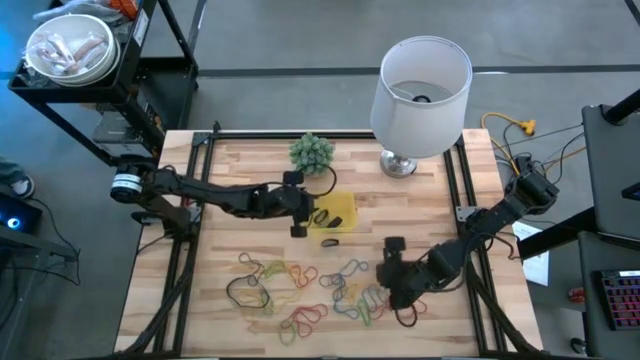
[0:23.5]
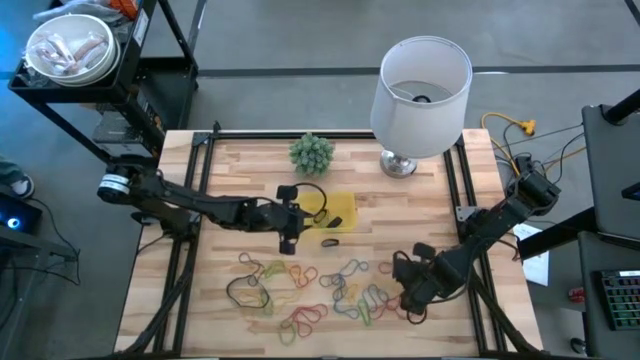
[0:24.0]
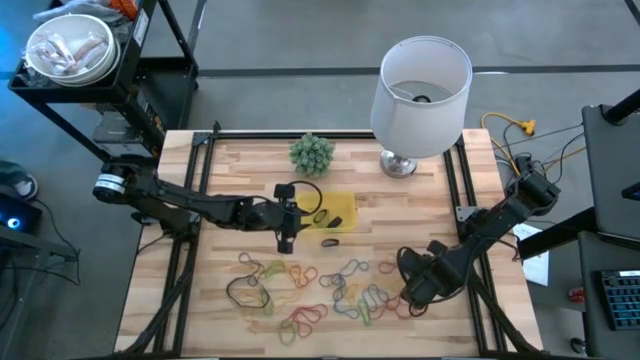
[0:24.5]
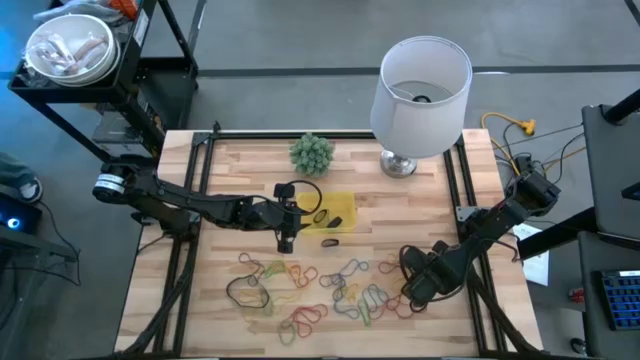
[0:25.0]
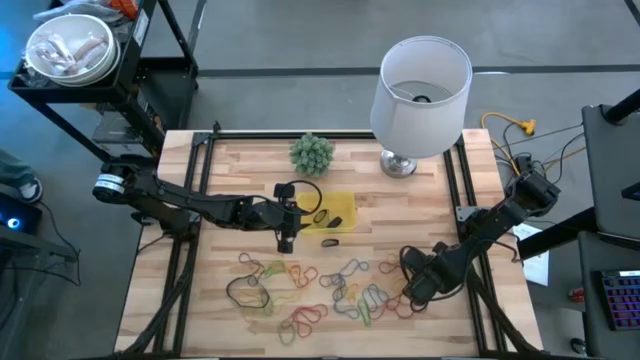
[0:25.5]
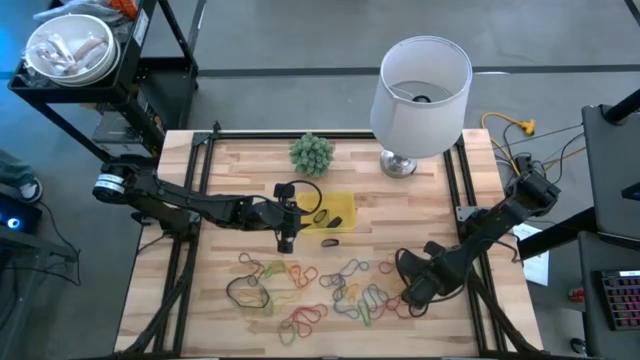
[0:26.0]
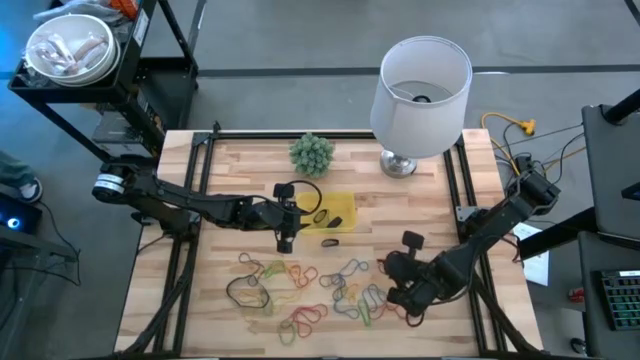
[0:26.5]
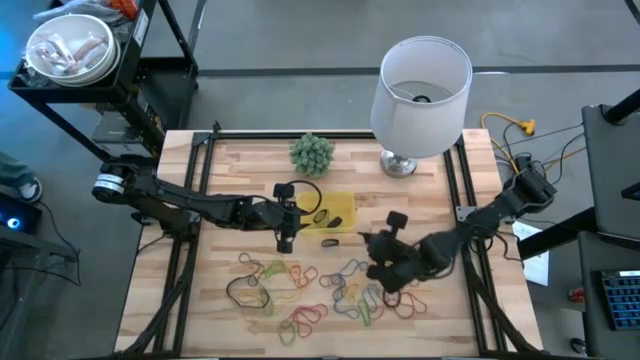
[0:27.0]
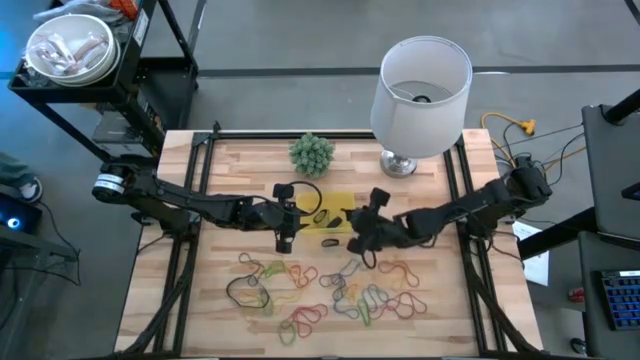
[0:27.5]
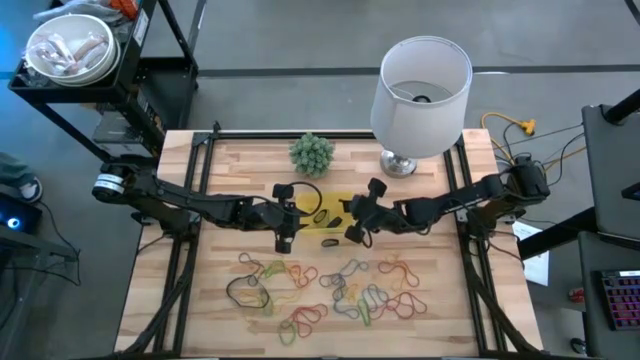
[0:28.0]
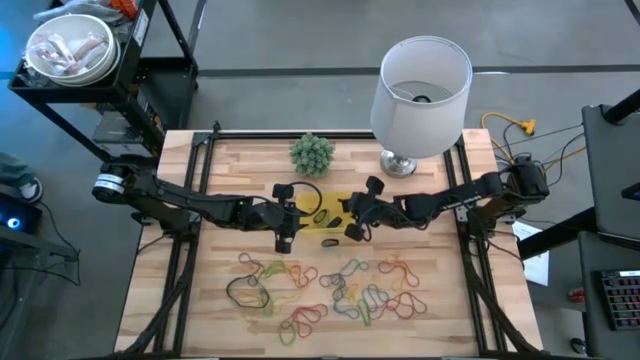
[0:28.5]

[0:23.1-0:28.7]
Task: Pick and place rubber bands into bin
Put the black rubber band into the yellow bin

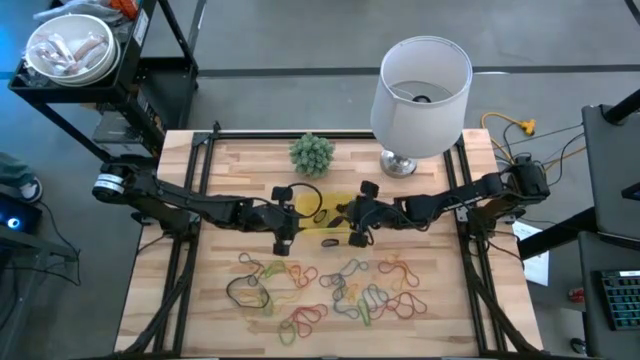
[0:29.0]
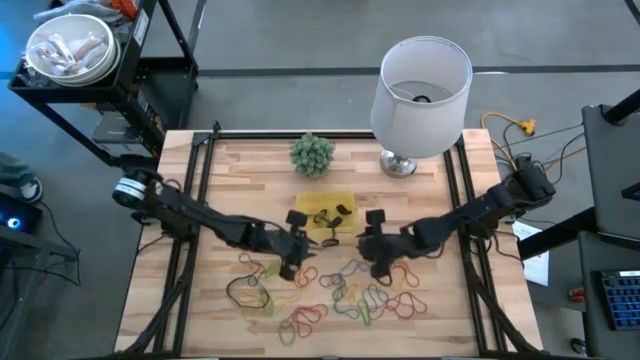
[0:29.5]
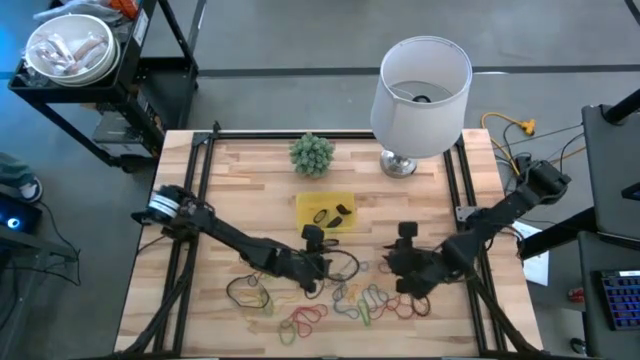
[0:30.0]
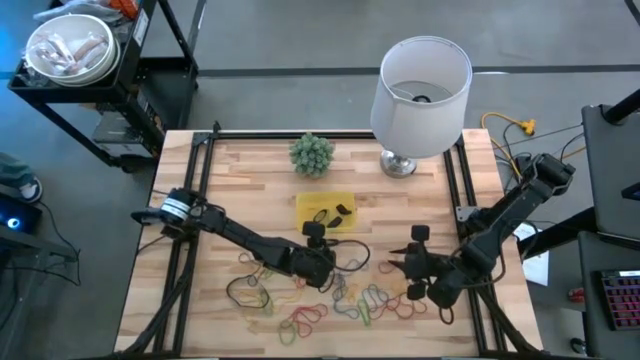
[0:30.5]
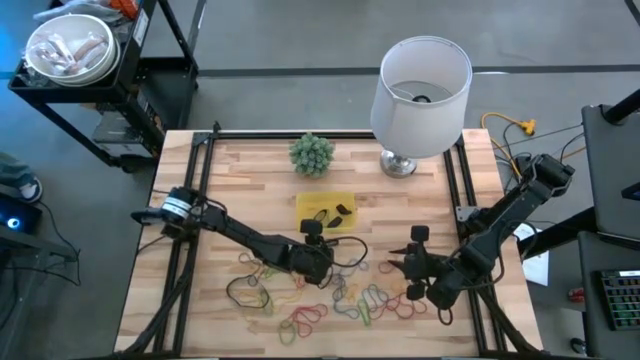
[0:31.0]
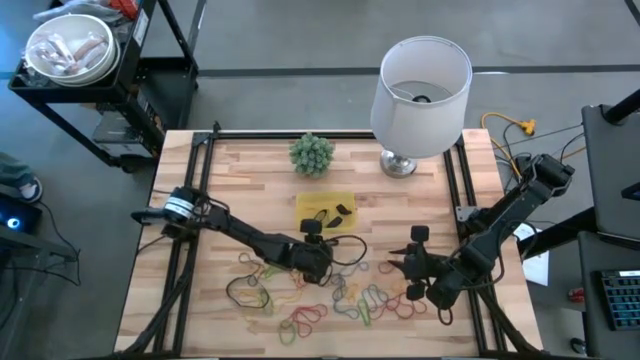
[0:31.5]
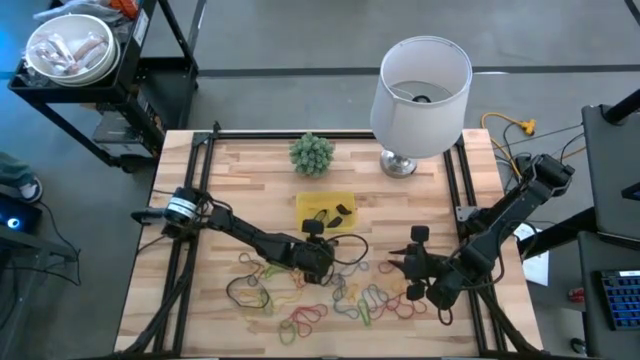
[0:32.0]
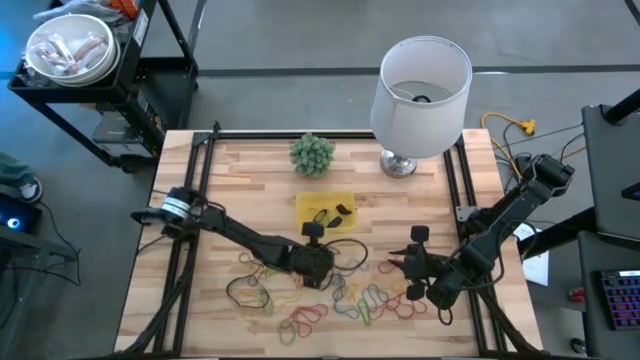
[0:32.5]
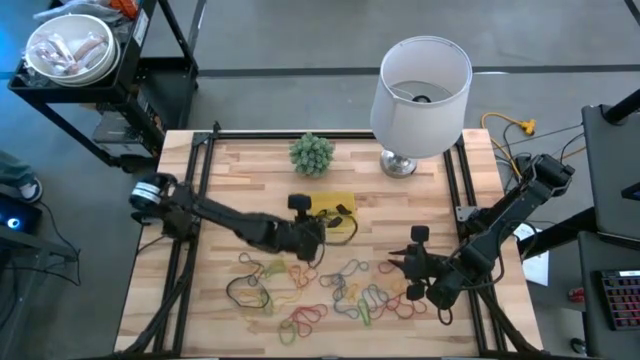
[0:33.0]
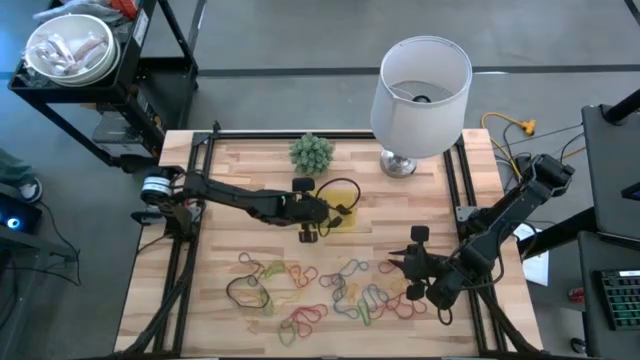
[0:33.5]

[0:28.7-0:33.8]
Put the black rubber band into the yellow bin

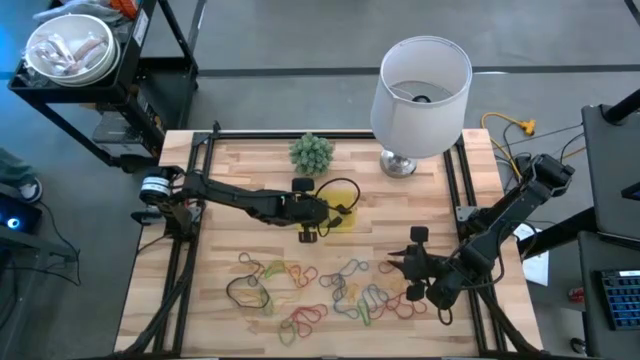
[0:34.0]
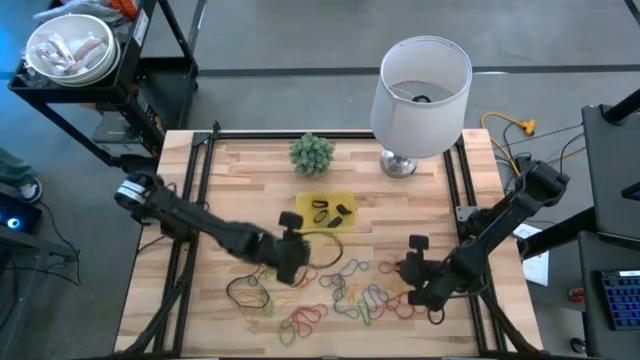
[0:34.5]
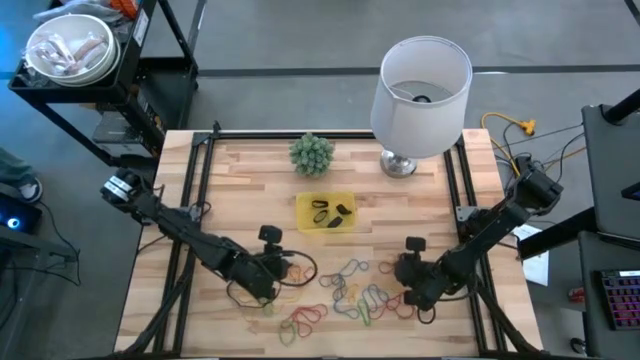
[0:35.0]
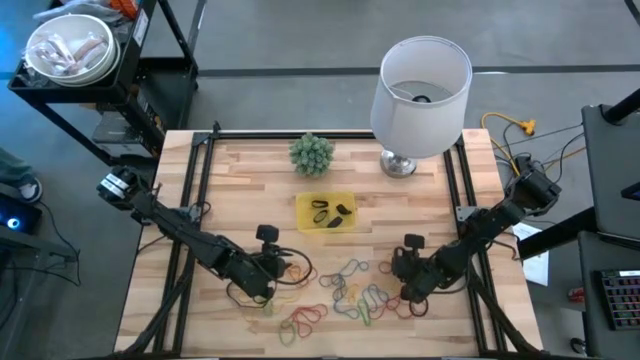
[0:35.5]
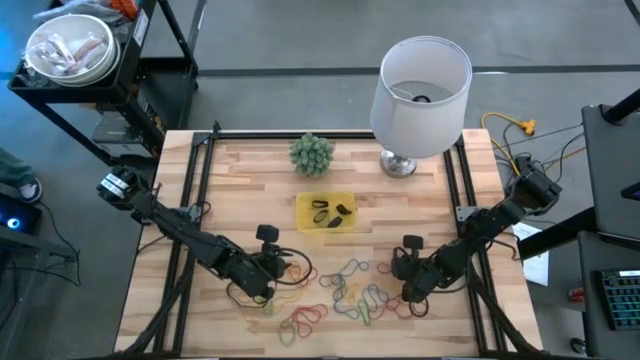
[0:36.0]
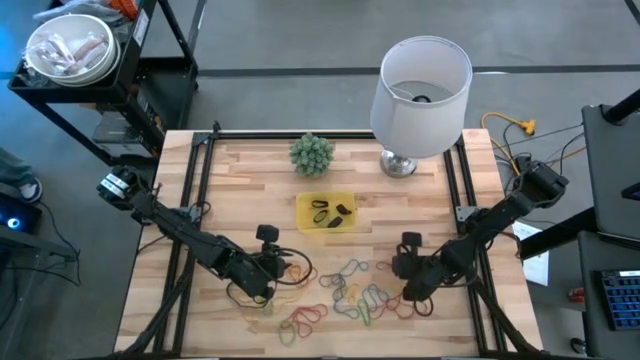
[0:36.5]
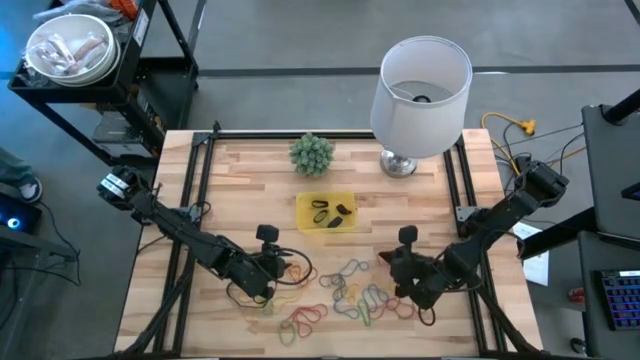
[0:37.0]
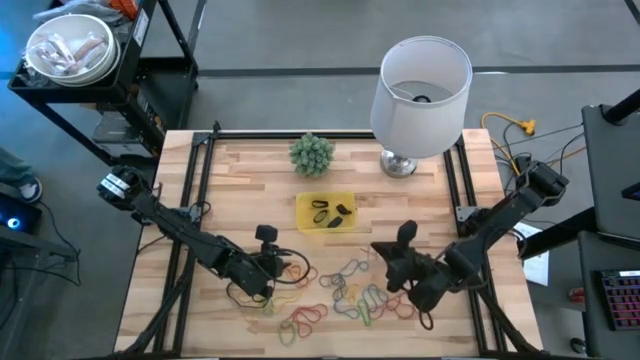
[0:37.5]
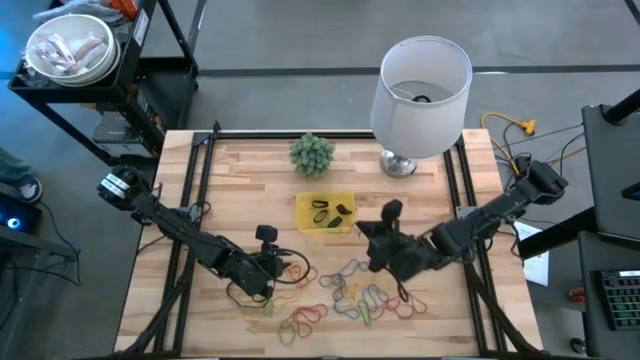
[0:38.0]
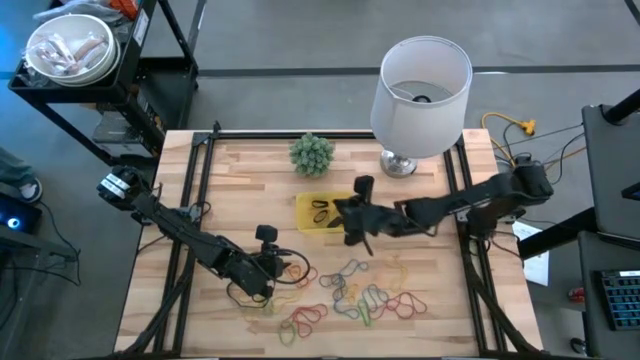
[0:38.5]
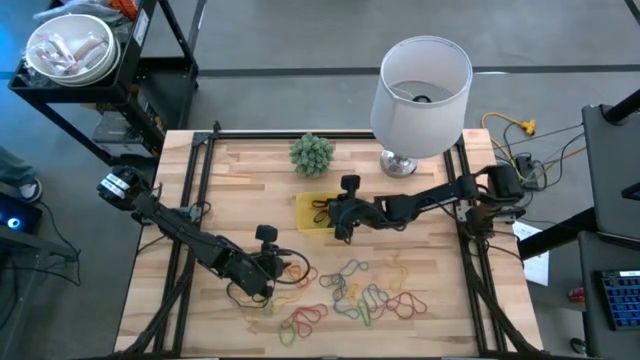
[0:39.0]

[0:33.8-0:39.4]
Put the red rubber band into the yellow bin

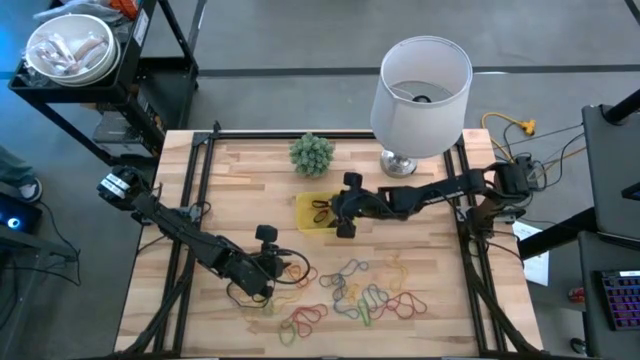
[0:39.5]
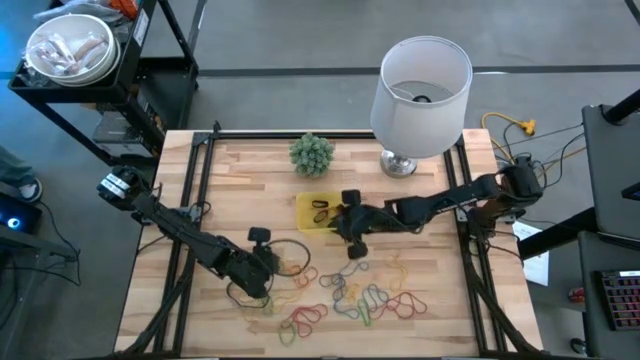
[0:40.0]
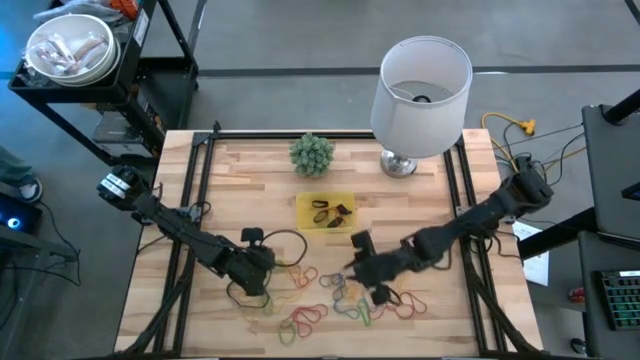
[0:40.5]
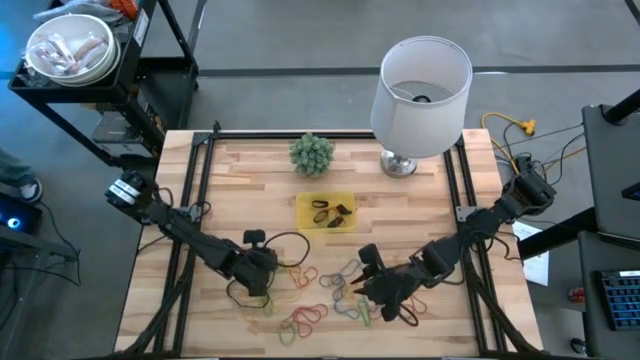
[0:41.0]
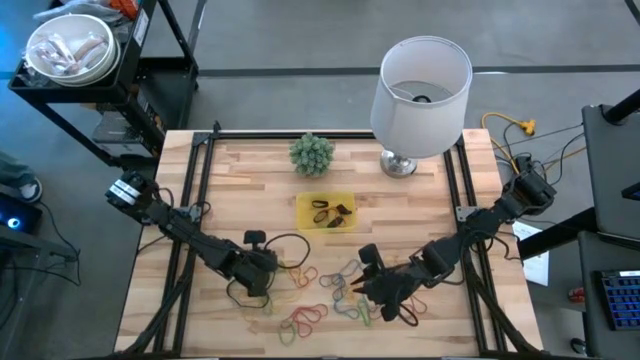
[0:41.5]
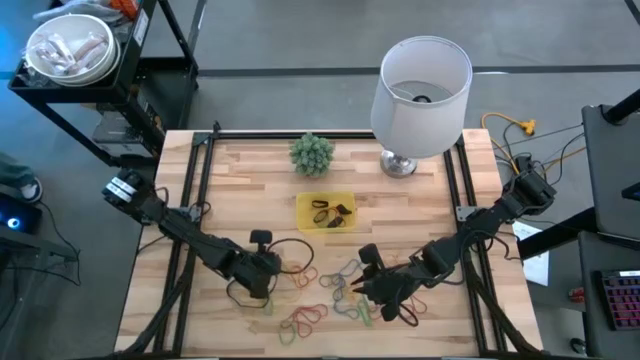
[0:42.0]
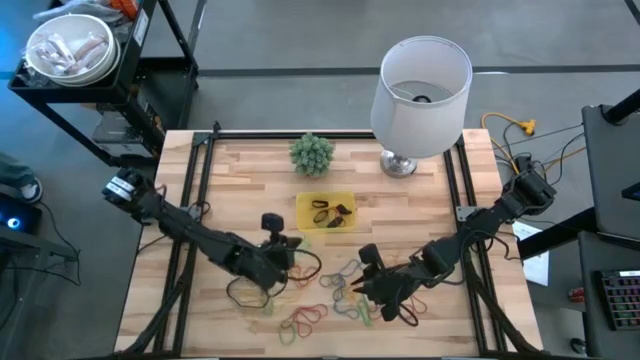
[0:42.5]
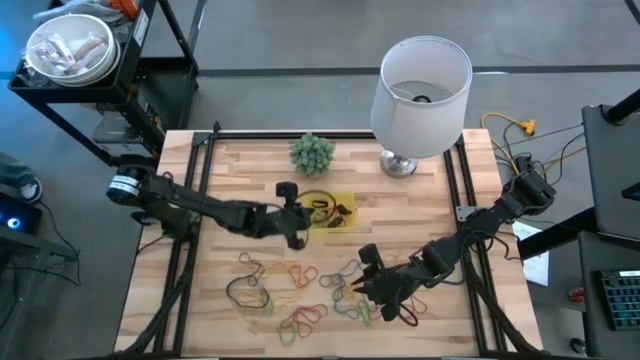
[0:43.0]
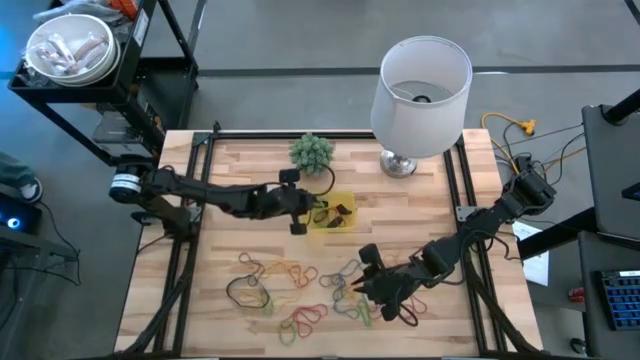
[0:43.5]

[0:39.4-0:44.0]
Put the green rubber band into the yellow bin

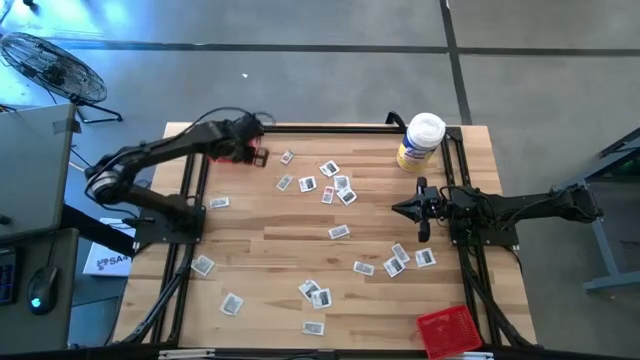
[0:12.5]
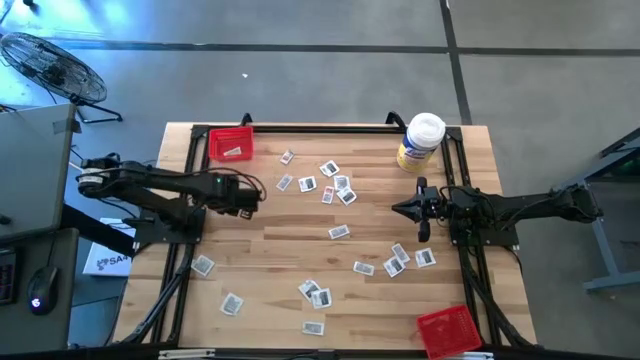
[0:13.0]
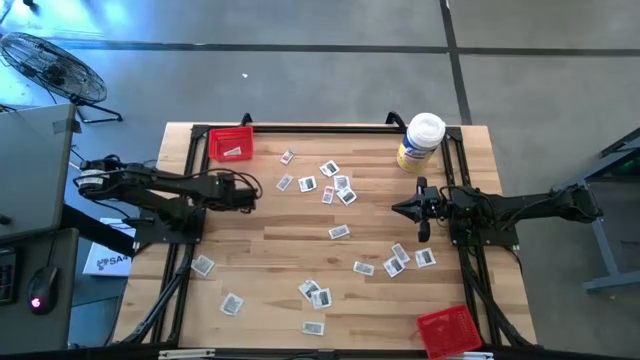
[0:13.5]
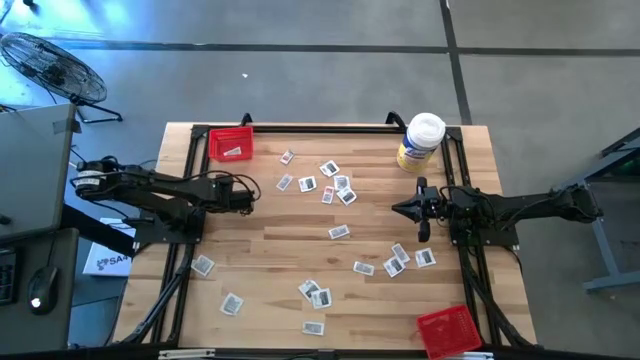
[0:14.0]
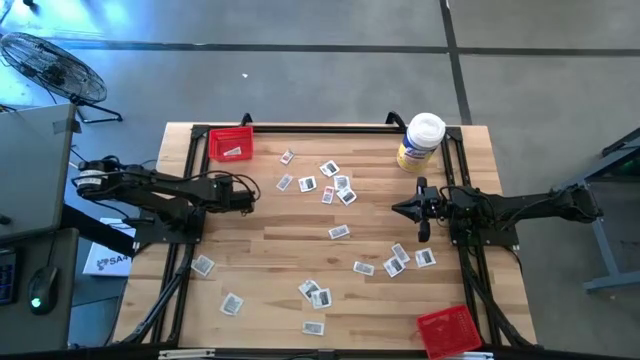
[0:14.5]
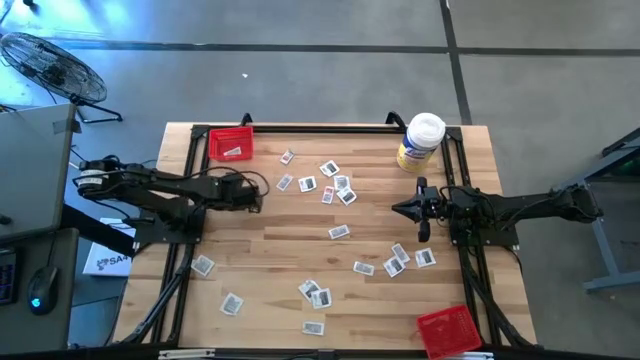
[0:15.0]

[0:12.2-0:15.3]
Task: Pick & Place First Aid Supplies
Put the white and orange ointment pack into the top red bin
